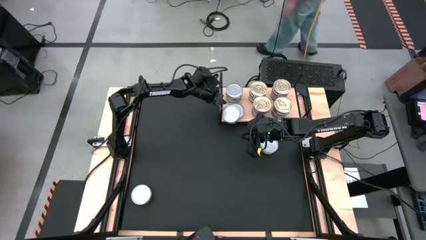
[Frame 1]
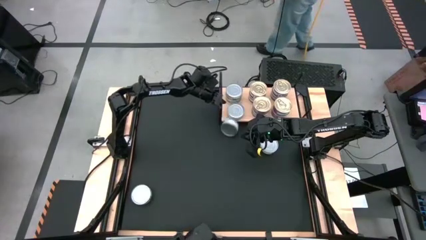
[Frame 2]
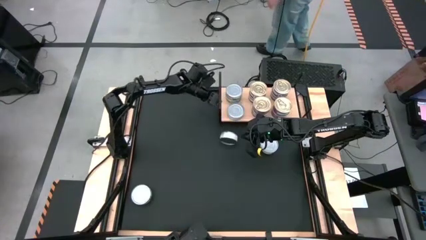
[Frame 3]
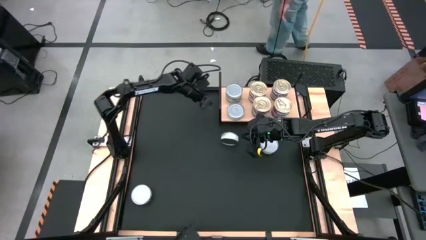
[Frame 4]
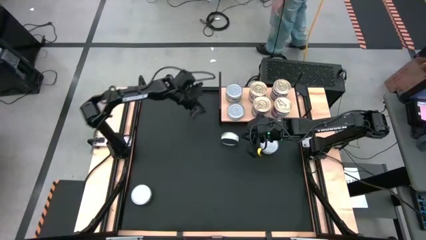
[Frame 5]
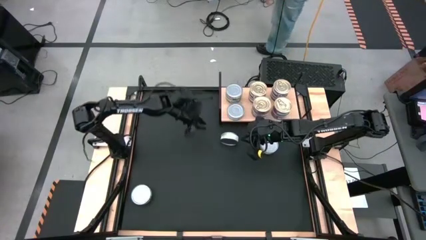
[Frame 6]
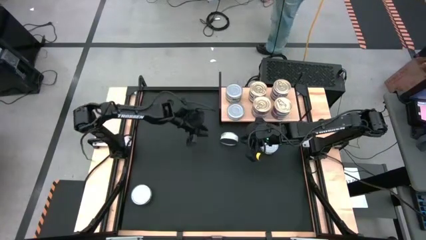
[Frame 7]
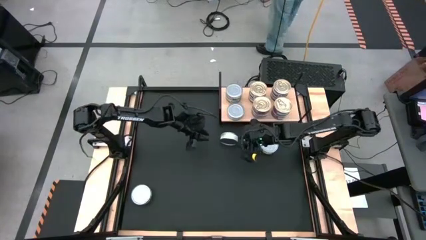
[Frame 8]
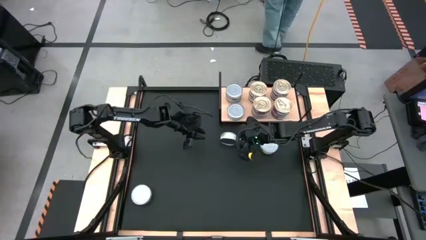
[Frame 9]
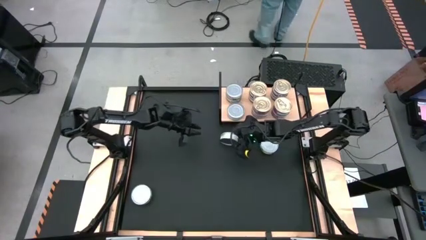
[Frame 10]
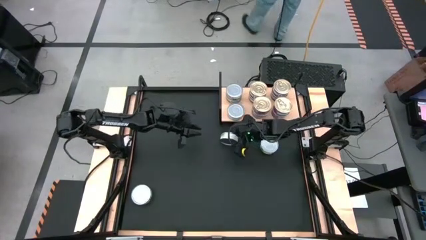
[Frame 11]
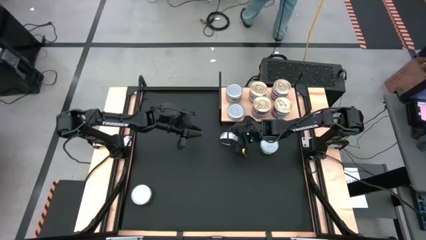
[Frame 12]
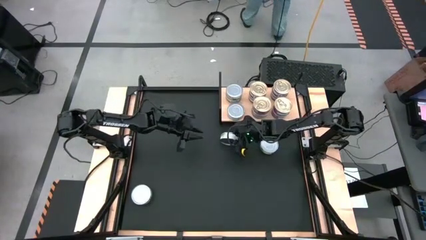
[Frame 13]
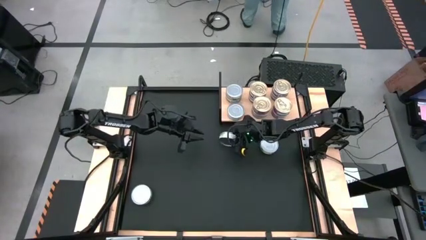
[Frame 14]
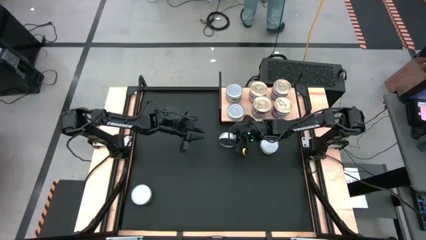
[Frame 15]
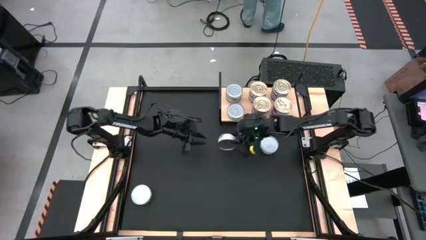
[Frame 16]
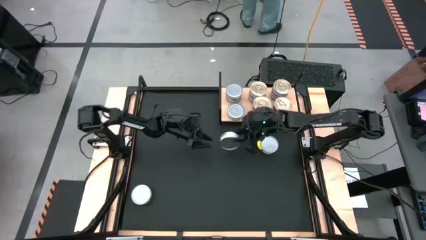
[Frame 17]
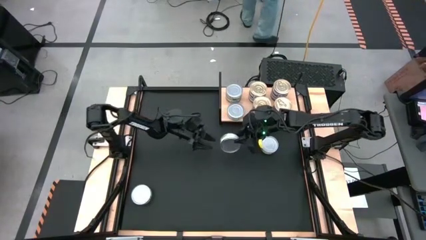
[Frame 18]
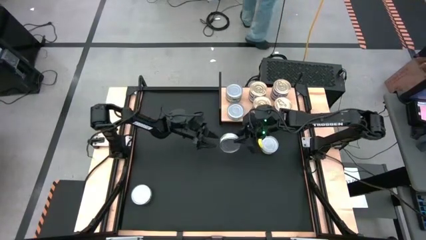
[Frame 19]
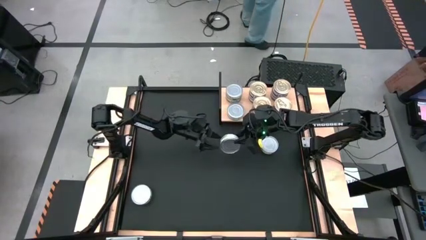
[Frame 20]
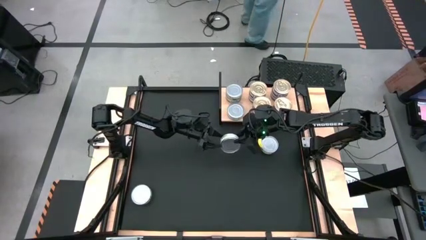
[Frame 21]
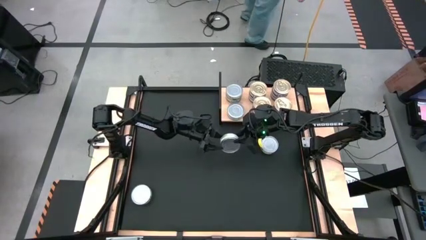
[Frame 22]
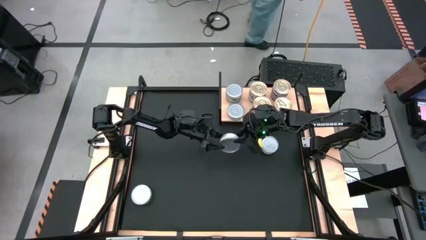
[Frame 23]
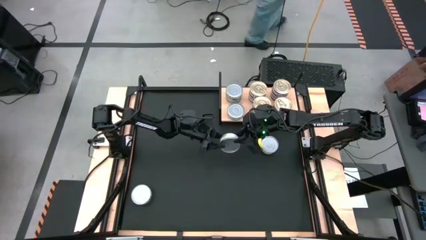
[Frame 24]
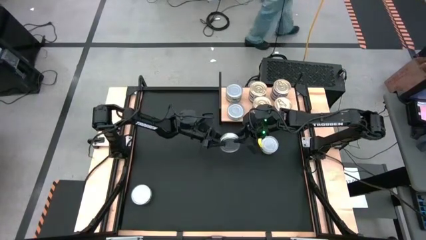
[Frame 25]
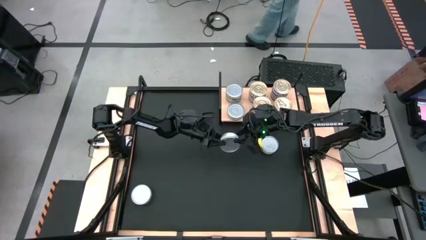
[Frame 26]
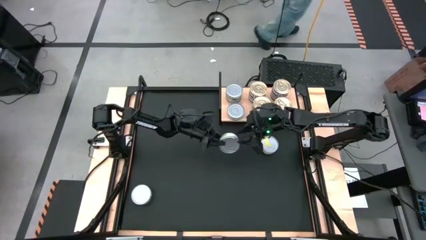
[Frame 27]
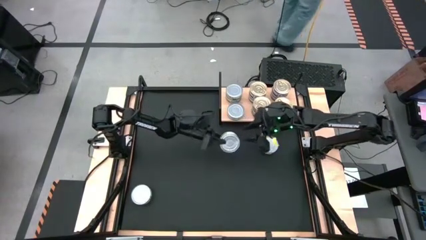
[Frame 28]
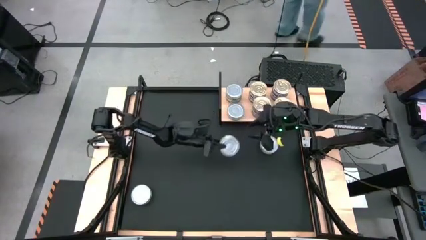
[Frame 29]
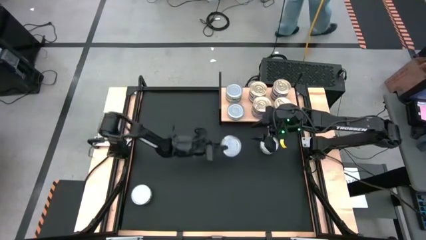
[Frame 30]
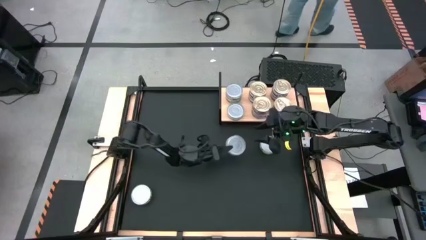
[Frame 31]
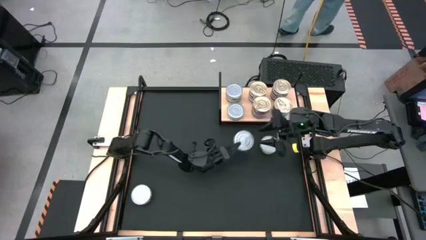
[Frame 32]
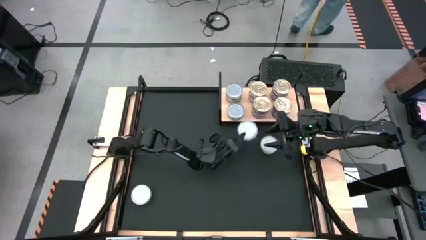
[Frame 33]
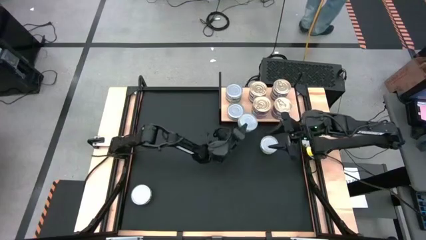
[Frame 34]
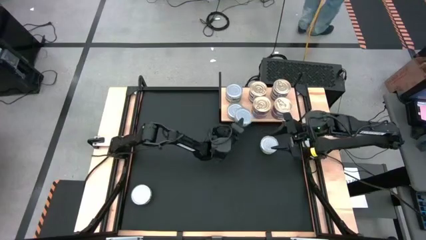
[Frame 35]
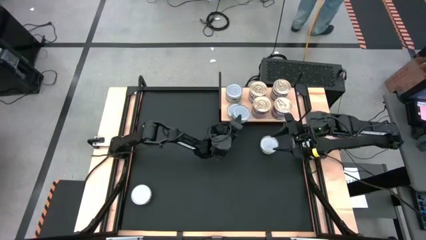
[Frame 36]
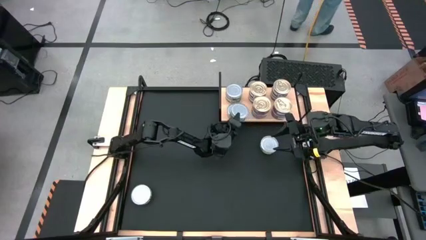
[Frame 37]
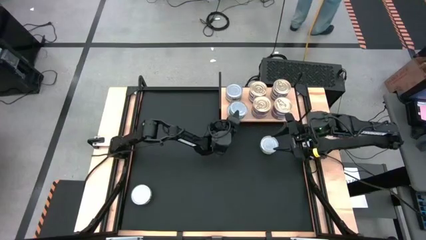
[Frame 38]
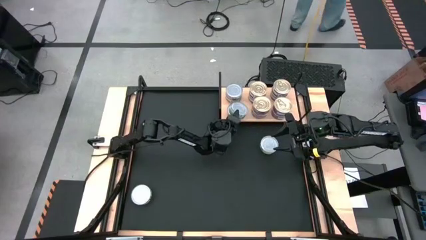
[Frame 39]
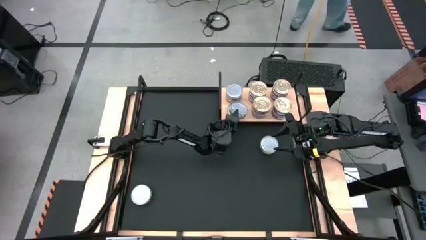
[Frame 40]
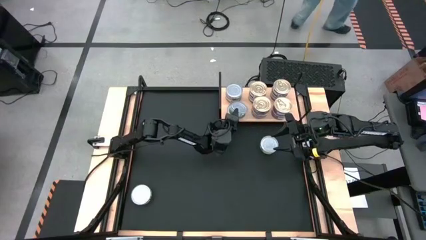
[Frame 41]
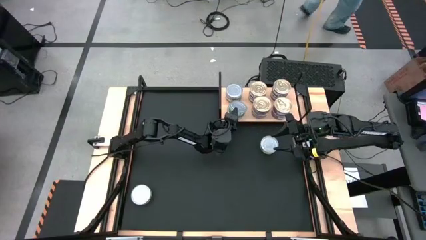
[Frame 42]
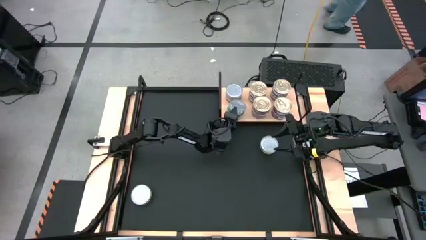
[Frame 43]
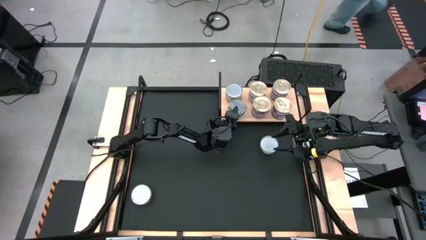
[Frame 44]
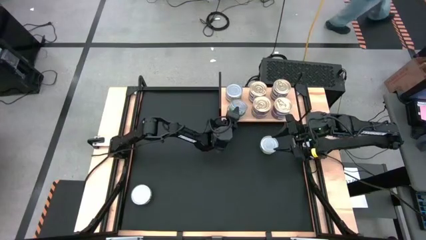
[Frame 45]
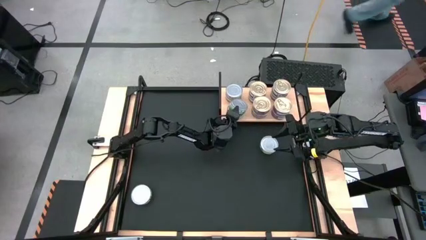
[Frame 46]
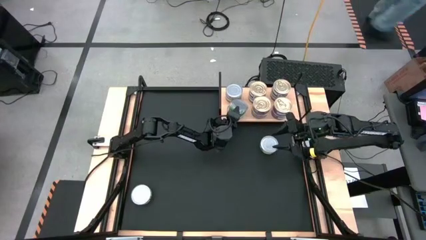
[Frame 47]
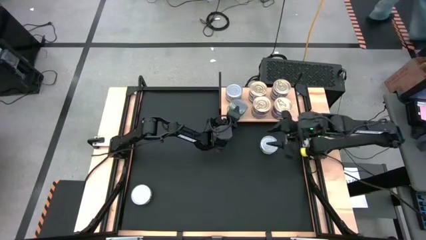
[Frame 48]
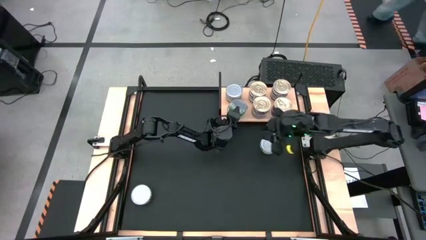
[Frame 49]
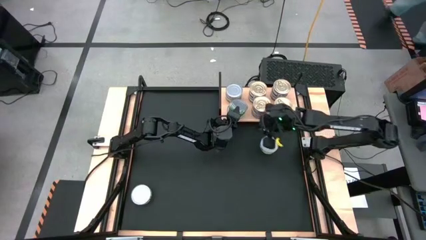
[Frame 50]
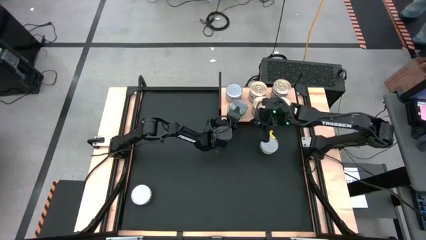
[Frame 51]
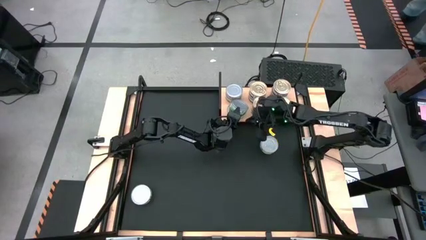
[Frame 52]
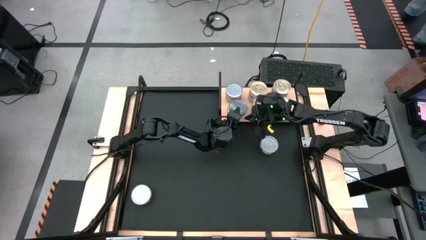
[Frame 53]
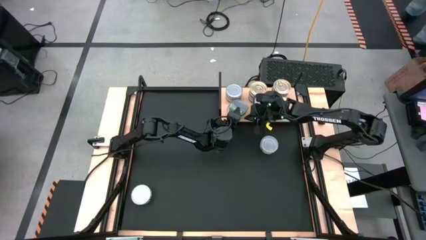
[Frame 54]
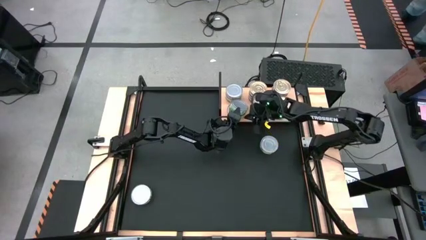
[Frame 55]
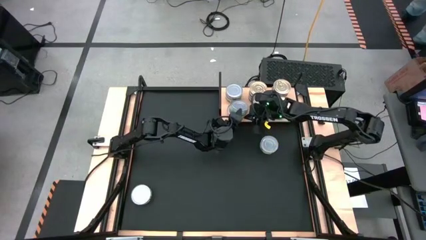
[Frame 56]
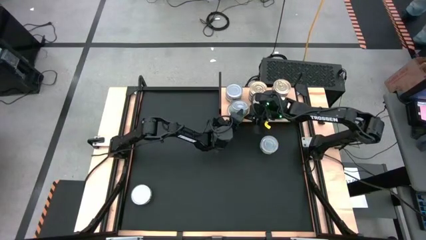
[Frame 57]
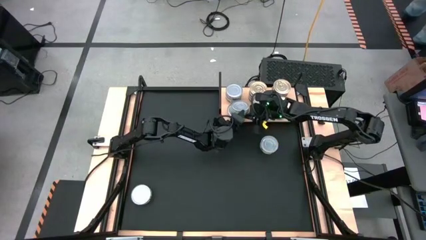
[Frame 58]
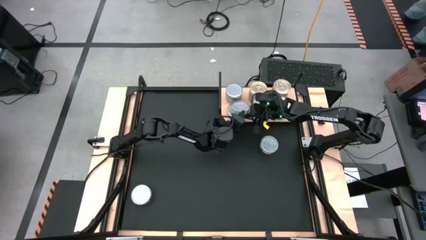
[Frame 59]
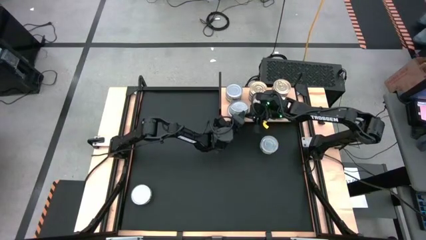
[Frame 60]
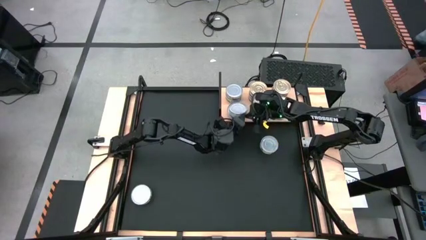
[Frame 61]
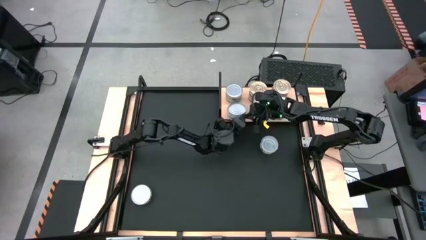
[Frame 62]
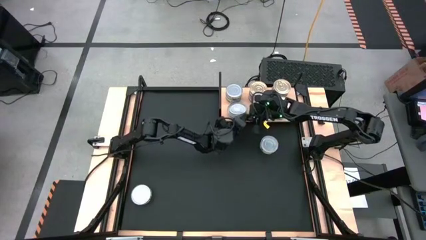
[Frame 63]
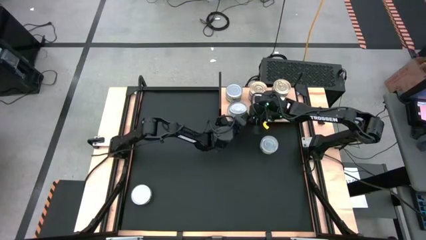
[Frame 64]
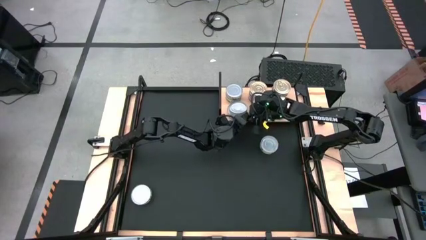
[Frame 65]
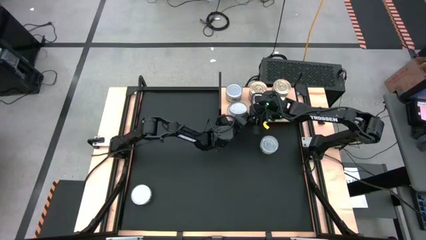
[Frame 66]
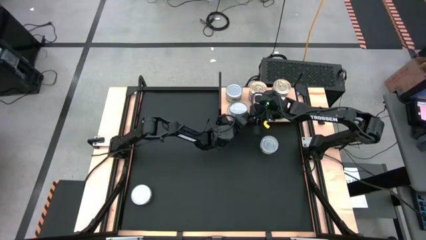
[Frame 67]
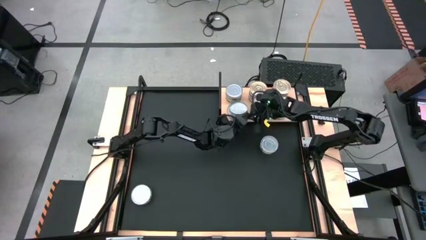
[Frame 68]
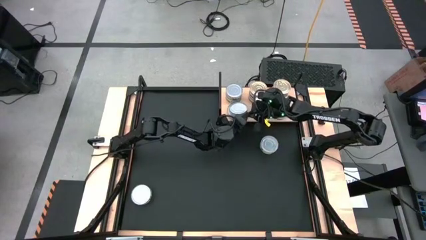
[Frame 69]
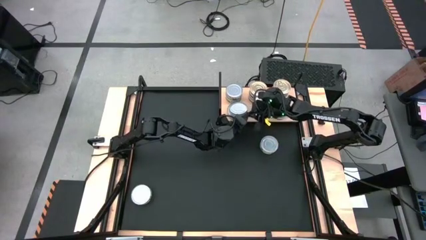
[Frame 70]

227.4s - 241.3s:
Task: Stack canned seafood by type on shelf
Stack the green tuna can on top of the other green tuna can on the shelf

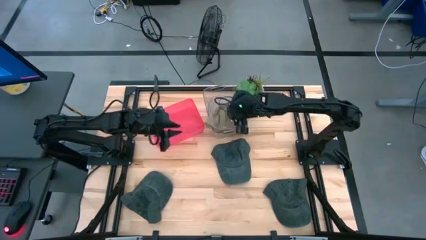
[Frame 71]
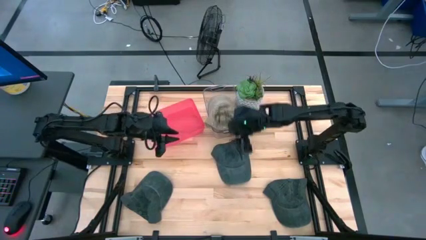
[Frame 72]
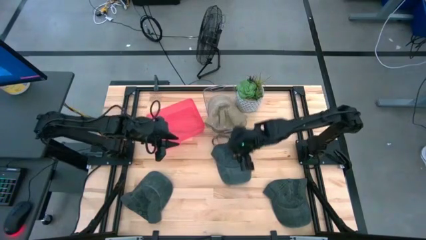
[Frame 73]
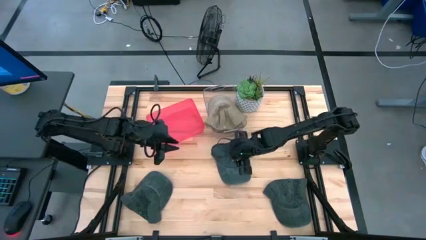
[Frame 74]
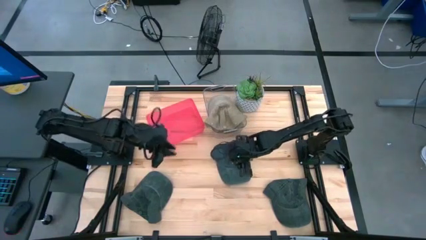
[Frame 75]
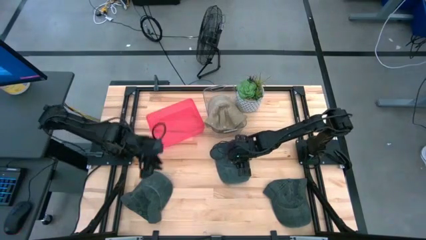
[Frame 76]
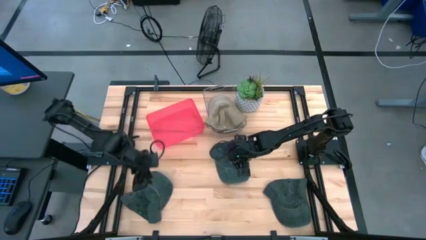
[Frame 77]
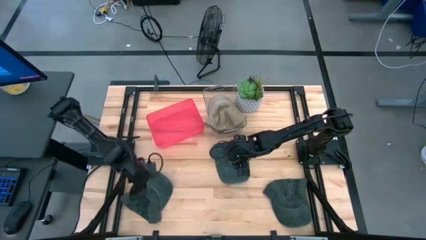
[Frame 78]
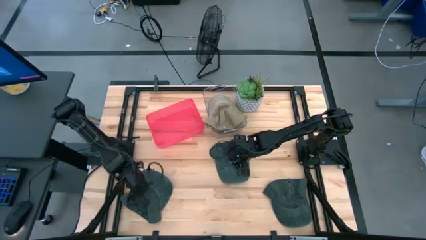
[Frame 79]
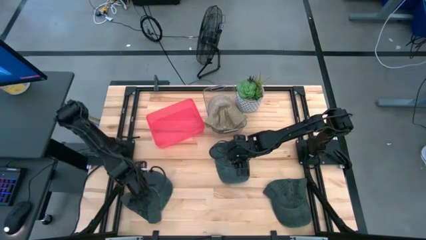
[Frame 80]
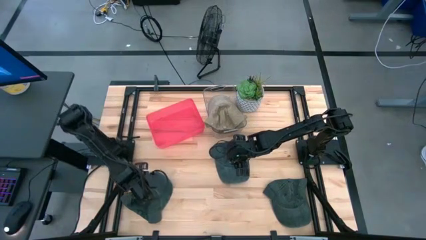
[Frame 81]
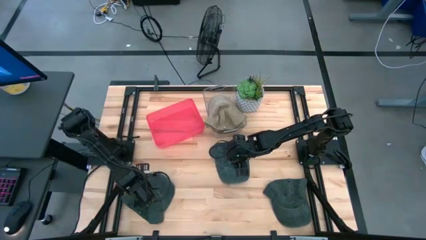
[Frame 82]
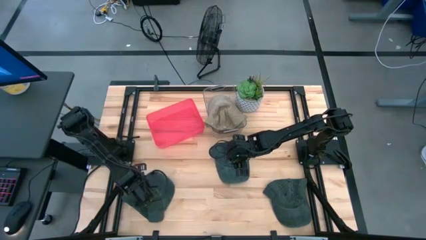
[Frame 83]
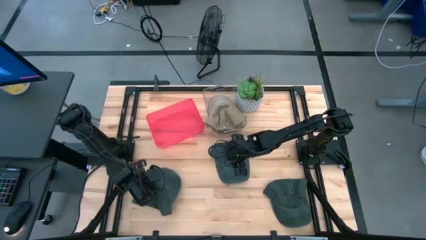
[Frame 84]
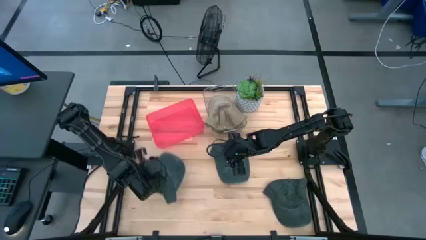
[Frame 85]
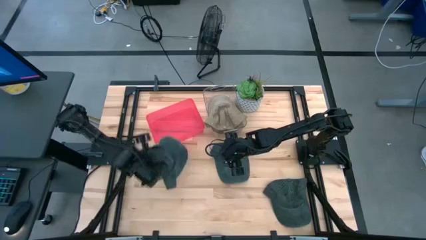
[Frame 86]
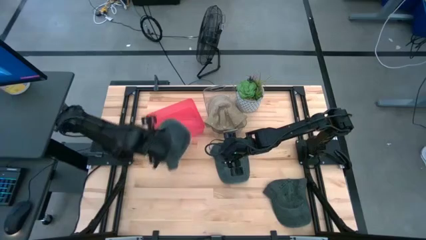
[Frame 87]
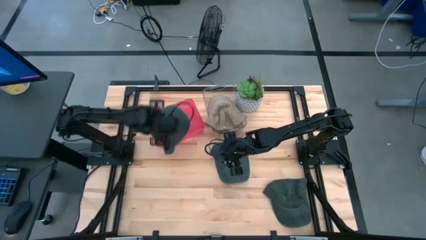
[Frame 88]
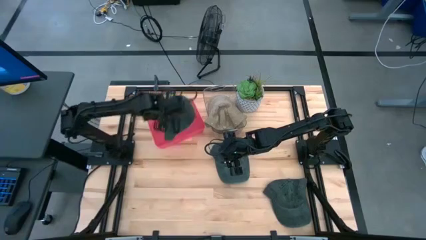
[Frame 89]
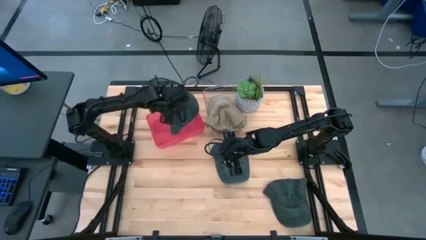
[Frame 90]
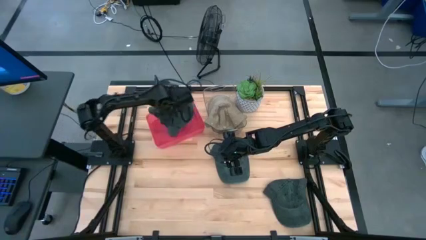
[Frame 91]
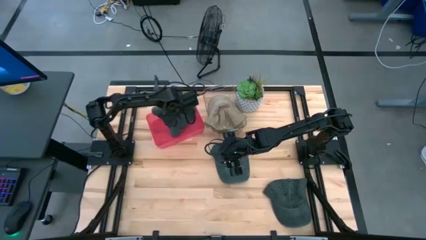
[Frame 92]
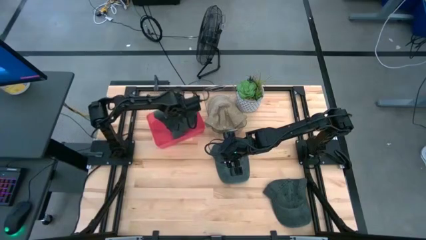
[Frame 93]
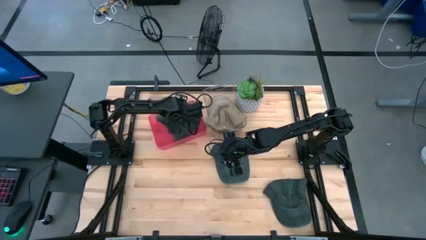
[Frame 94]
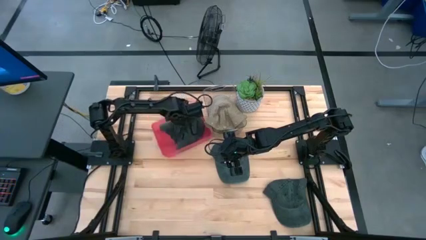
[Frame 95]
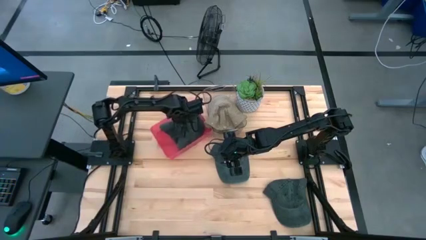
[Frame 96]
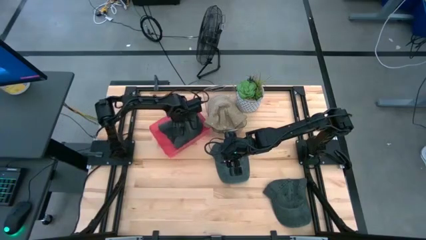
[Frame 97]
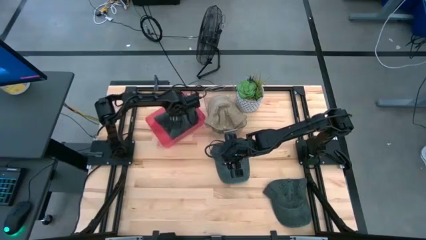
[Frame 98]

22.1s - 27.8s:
Task: Pick & Place hat
Put the bottom left black cap into the pink bin
